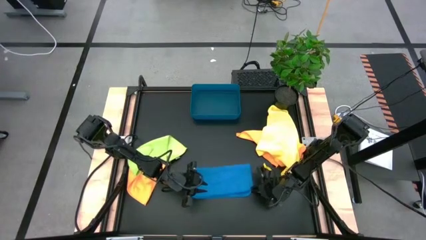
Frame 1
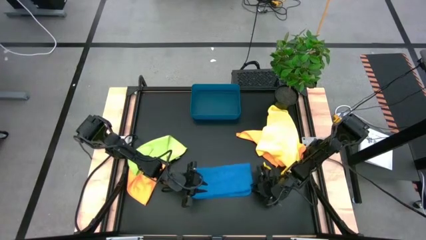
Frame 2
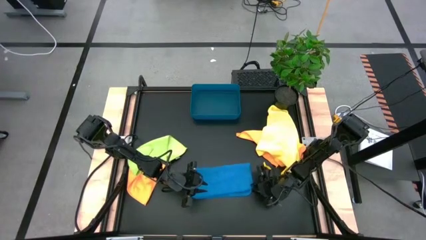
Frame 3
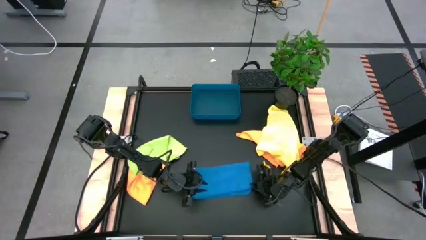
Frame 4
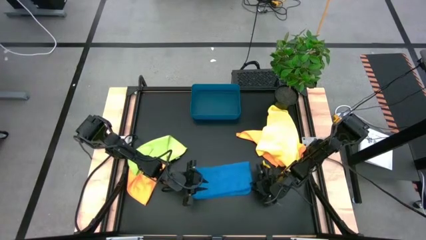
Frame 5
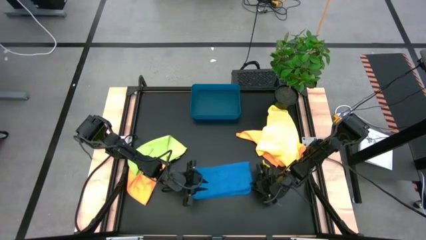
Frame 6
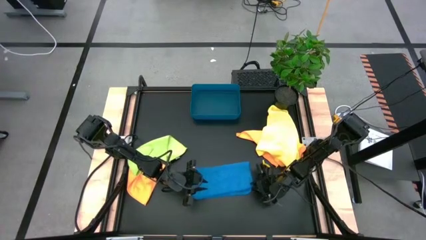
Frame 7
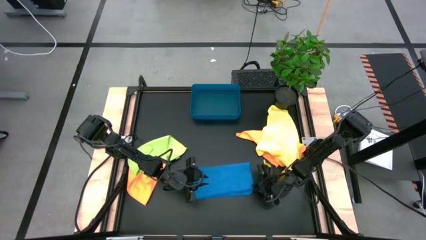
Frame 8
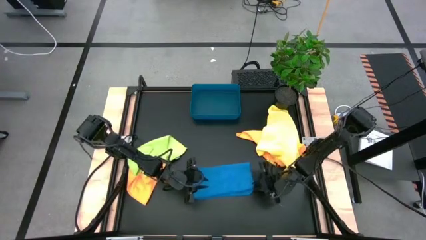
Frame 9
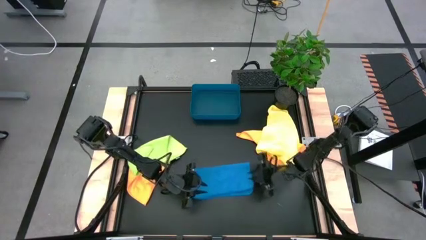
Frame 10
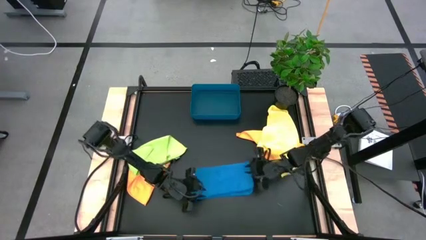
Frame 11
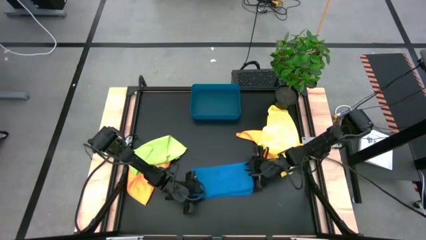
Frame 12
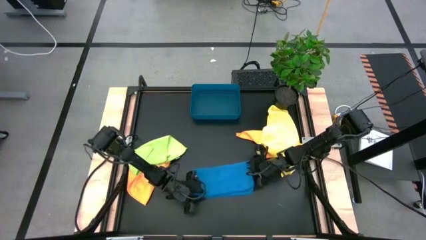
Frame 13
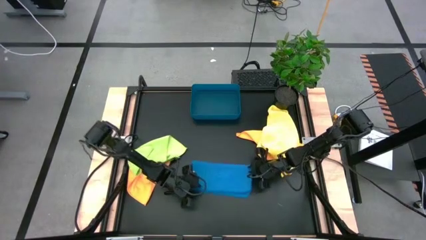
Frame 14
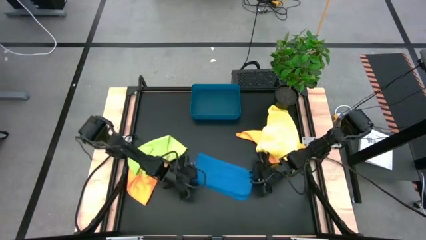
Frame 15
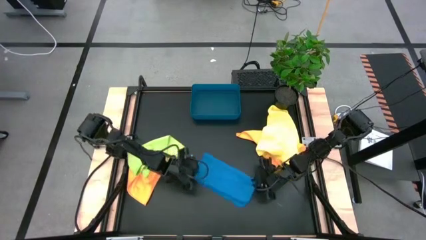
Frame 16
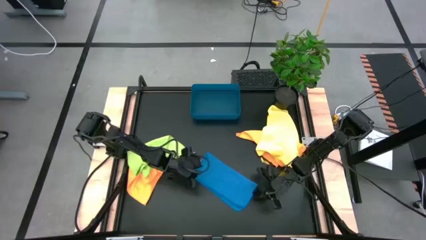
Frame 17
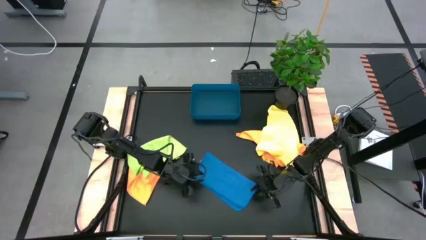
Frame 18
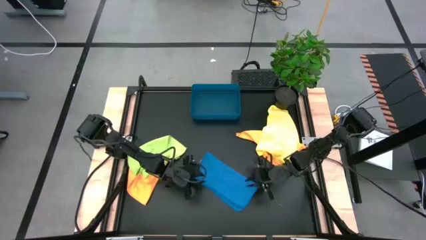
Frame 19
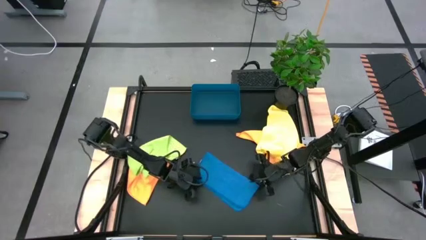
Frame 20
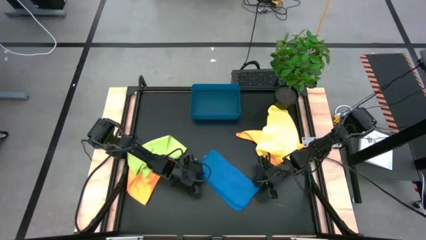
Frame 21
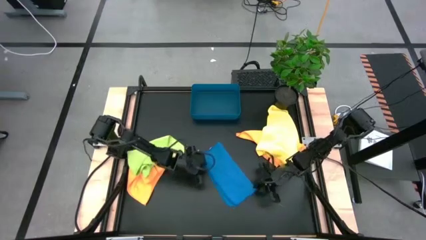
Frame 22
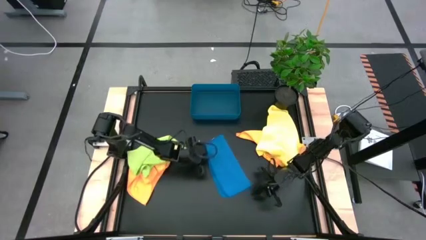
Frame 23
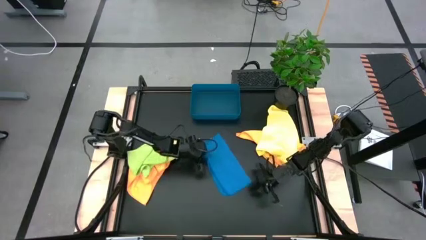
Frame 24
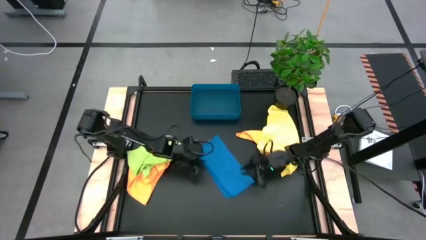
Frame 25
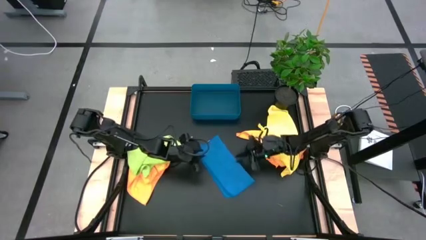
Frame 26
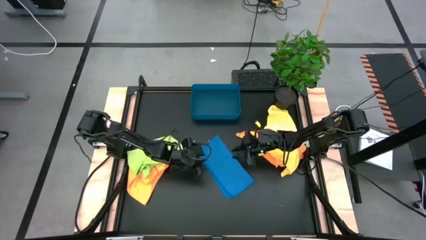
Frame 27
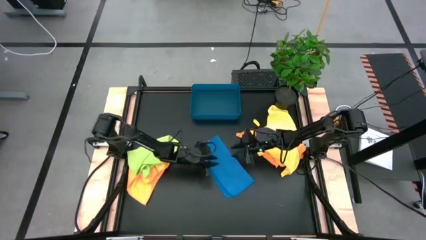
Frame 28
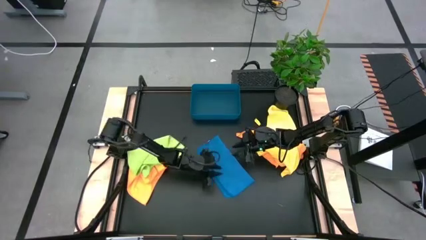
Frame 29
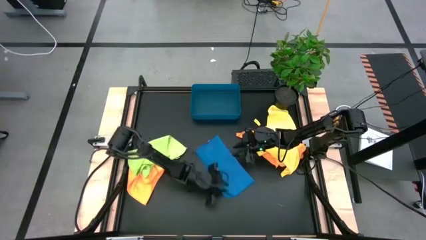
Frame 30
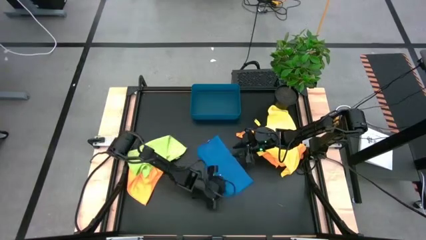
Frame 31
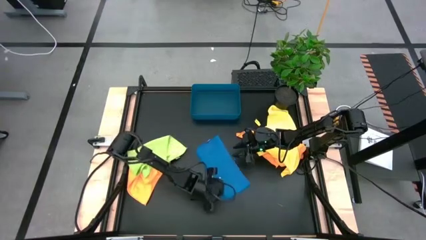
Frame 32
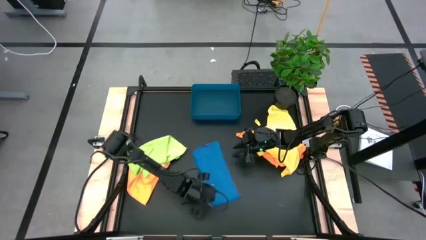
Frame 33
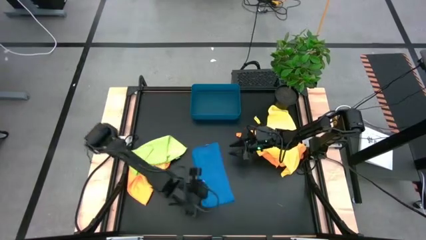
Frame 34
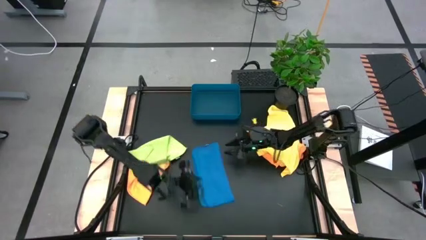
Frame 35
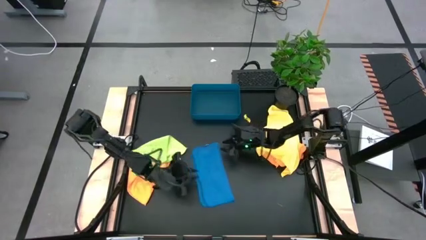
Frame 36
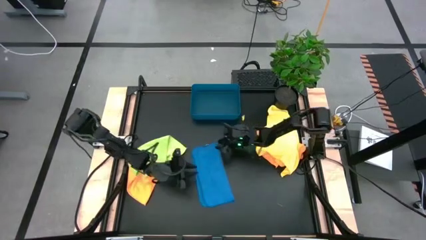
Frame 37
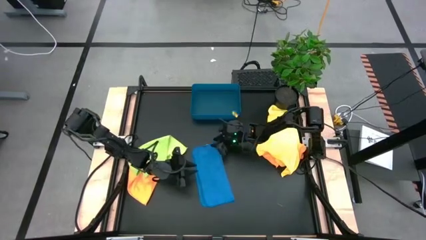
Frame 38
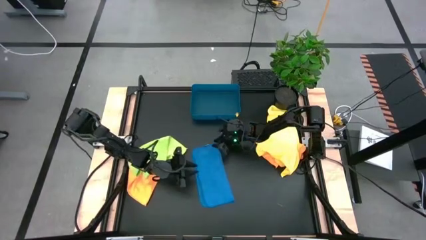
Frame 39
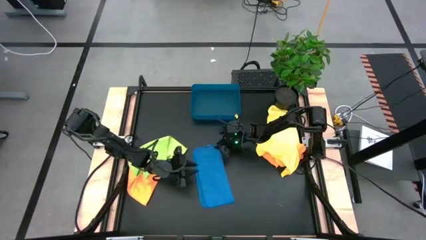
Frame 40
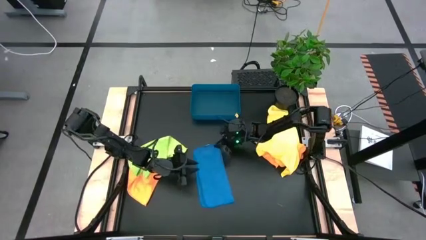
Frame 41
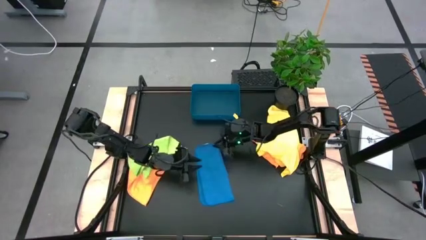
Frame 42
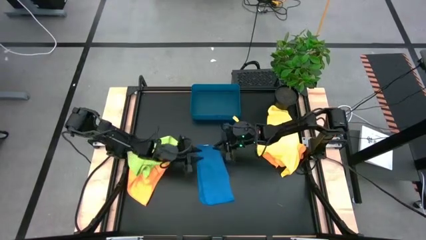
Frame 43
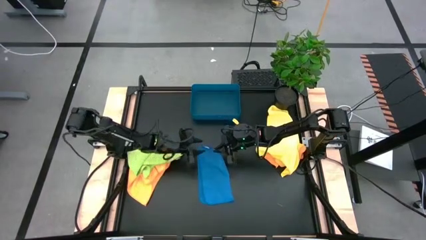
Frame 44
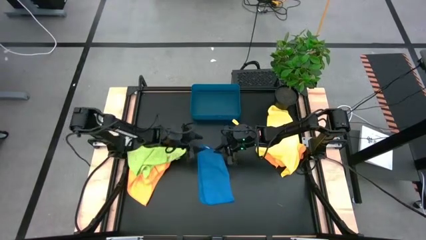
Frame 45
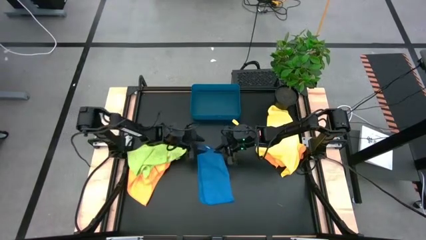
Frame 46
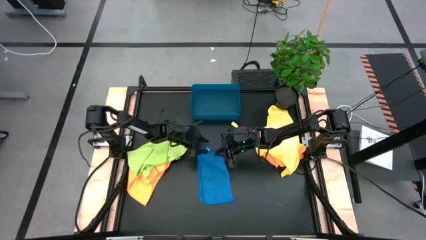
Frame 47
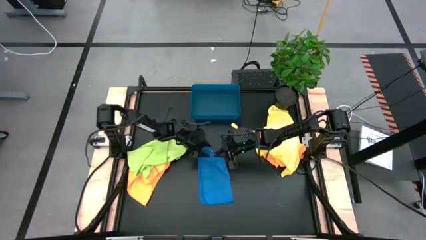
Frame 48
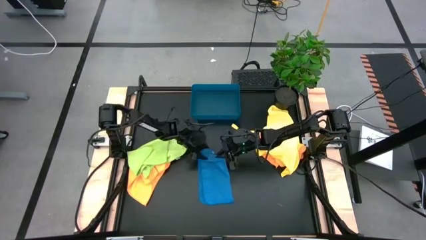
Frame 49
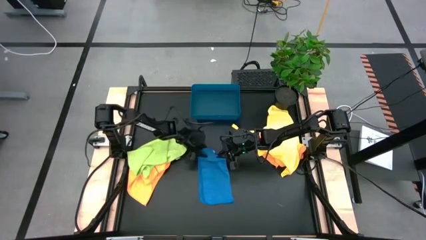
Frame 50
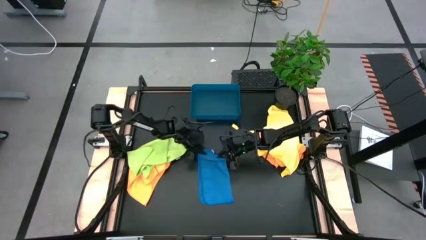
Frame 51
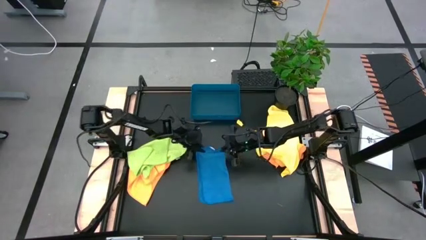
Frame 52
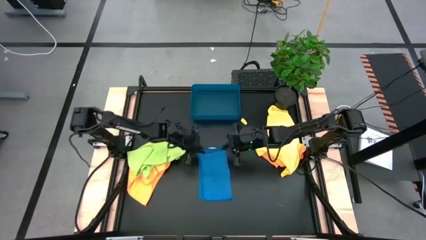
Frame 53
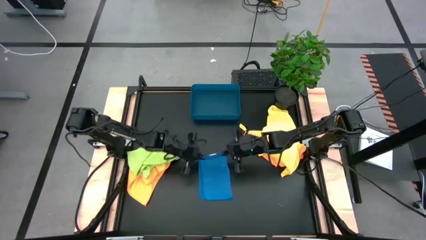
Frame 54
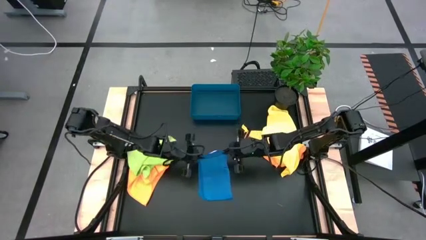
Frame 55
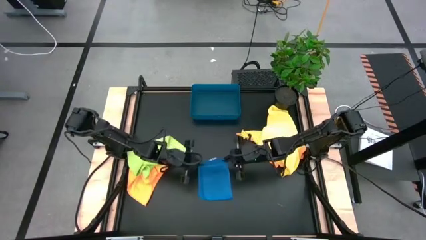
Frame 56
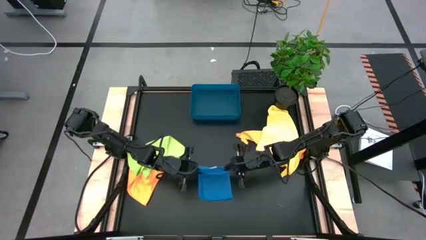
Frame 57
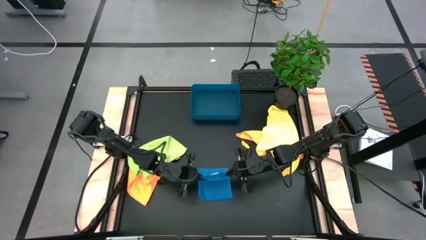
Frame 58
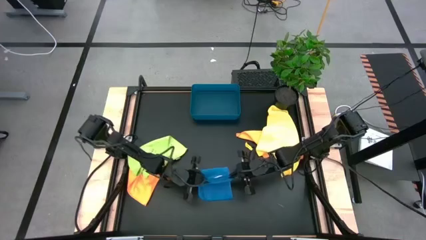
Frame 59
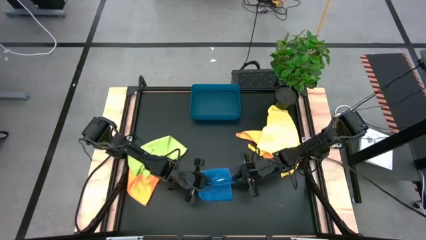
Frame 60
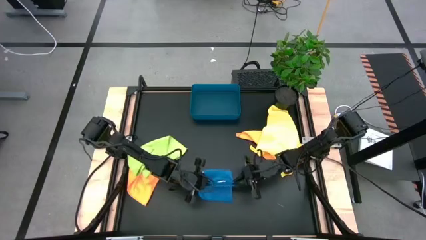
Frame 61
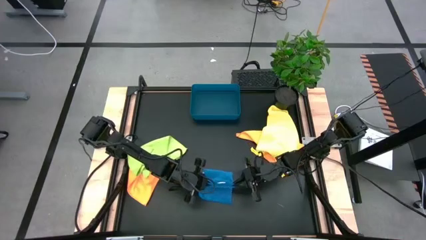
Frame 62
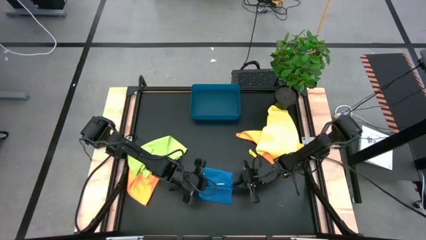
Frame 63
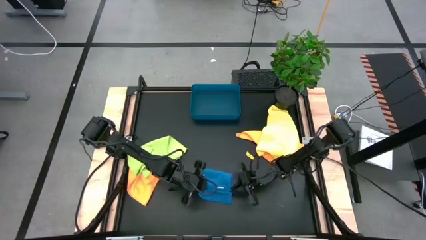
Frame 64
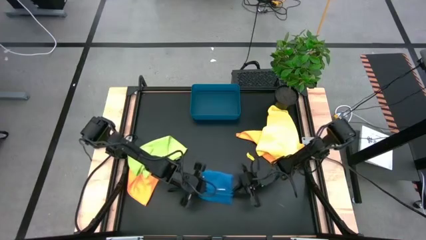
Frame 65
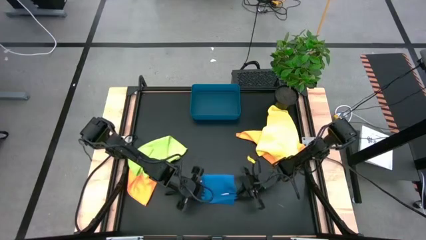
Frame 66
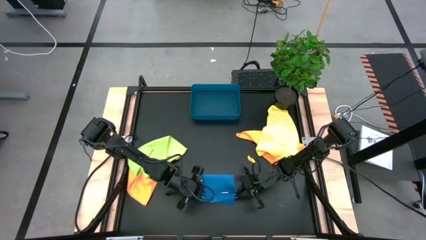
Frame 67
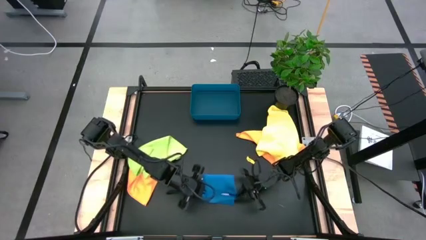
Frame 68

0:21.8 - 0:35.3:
Task: Fold microfiber towels
Fold the blue microfiber cloth
